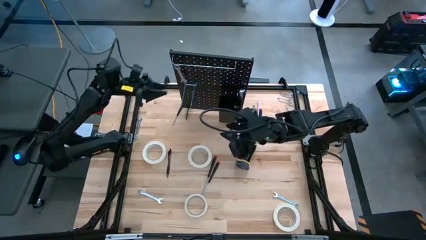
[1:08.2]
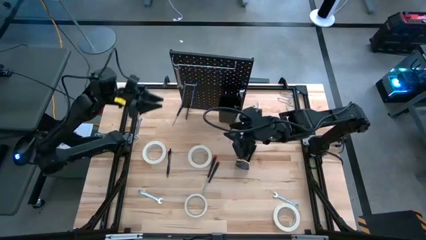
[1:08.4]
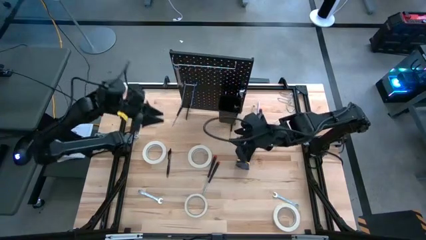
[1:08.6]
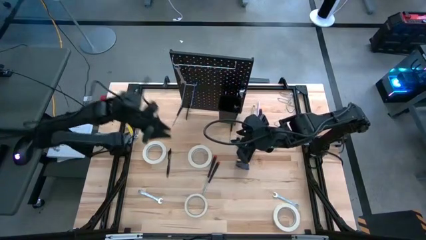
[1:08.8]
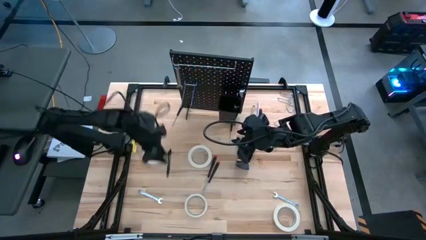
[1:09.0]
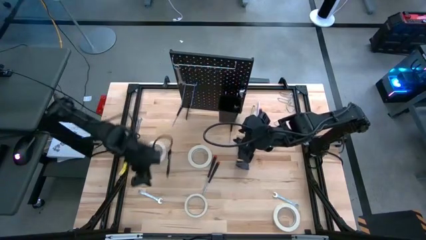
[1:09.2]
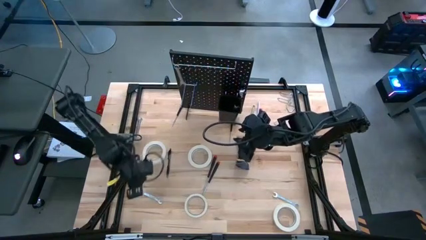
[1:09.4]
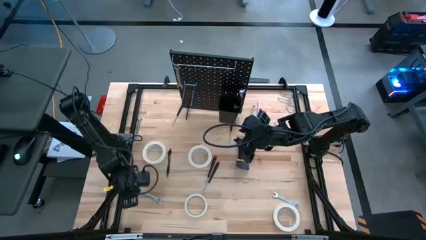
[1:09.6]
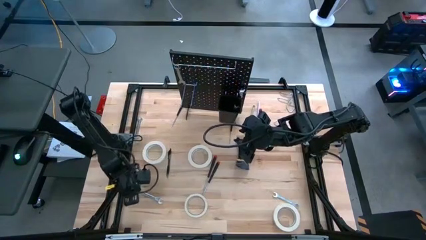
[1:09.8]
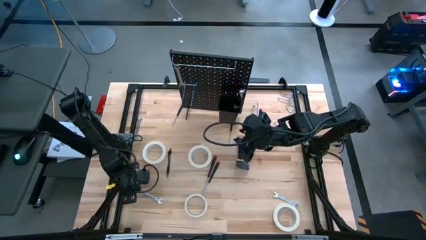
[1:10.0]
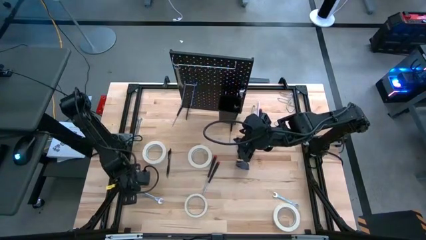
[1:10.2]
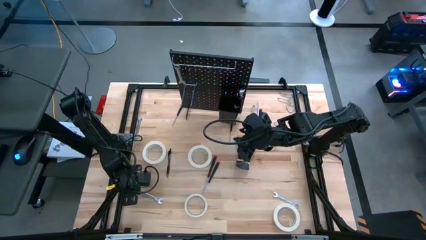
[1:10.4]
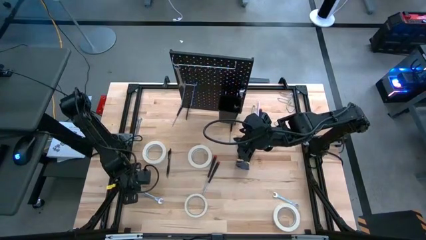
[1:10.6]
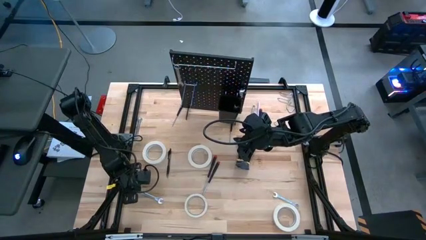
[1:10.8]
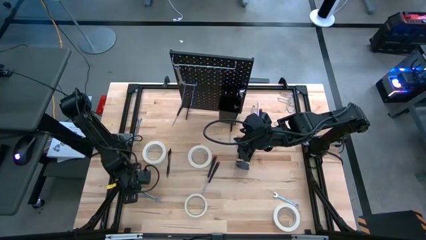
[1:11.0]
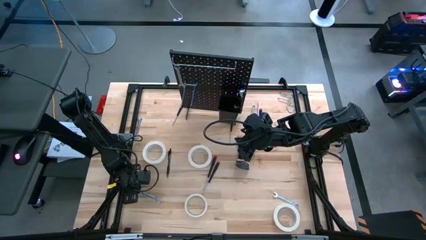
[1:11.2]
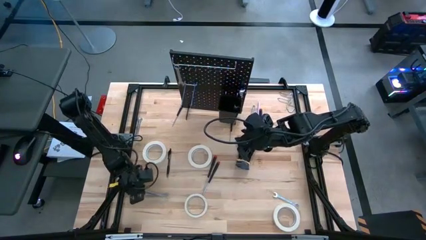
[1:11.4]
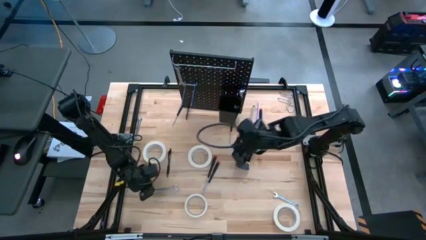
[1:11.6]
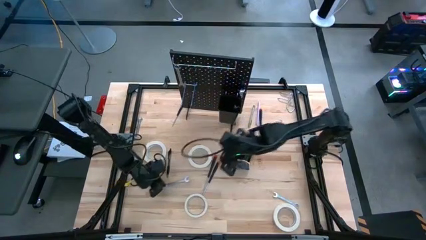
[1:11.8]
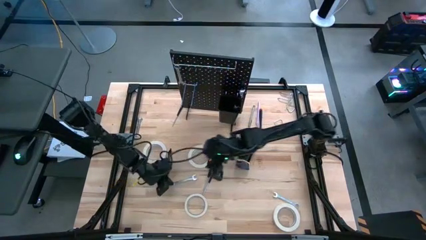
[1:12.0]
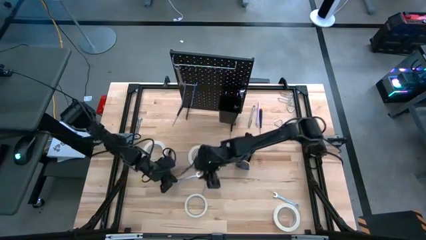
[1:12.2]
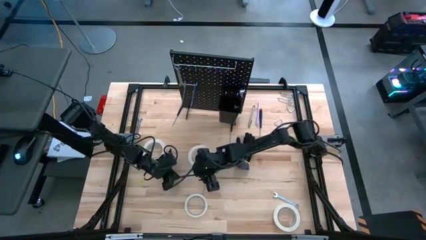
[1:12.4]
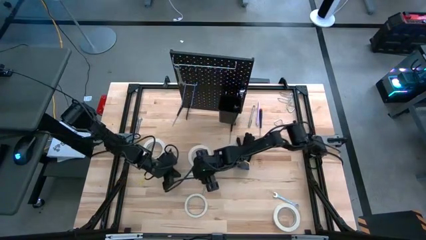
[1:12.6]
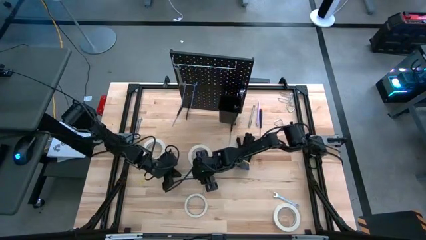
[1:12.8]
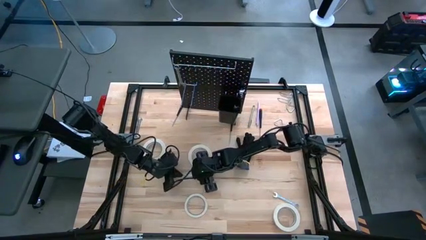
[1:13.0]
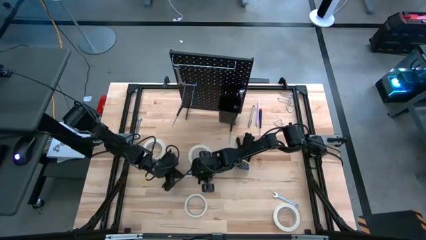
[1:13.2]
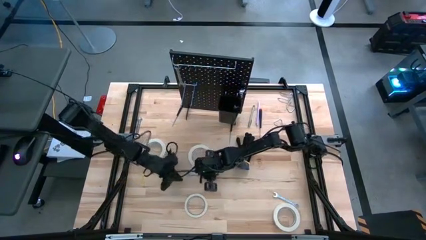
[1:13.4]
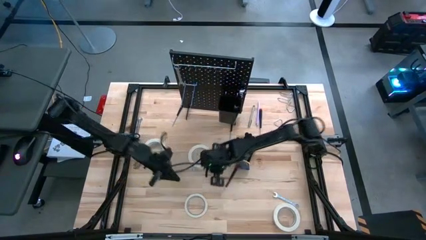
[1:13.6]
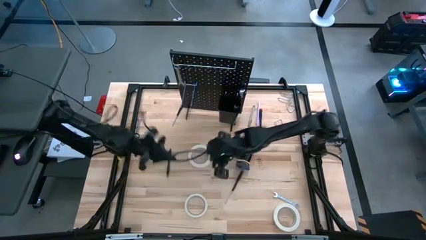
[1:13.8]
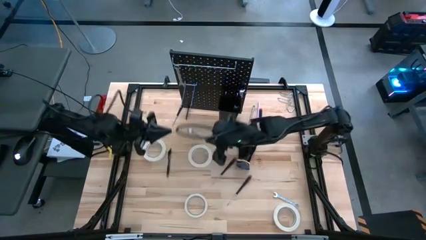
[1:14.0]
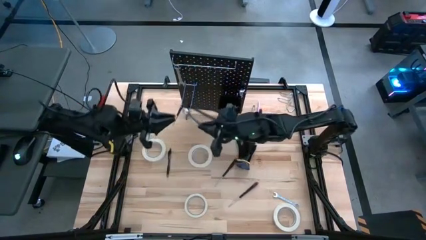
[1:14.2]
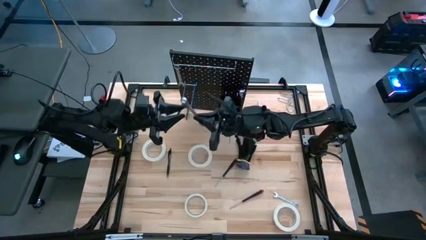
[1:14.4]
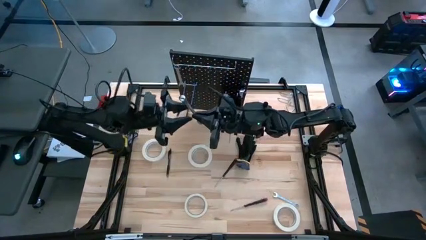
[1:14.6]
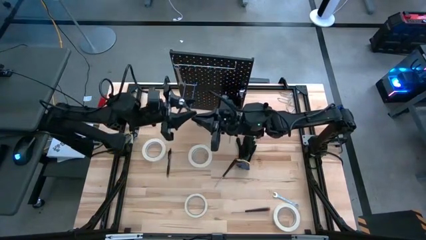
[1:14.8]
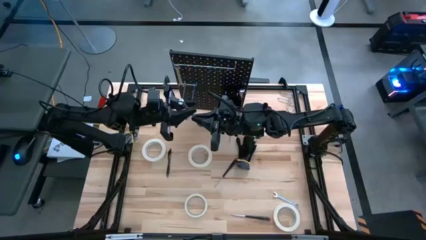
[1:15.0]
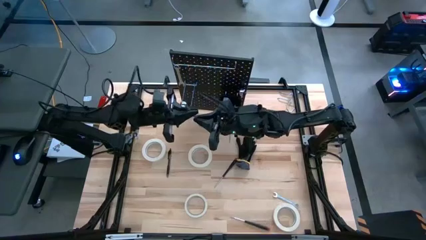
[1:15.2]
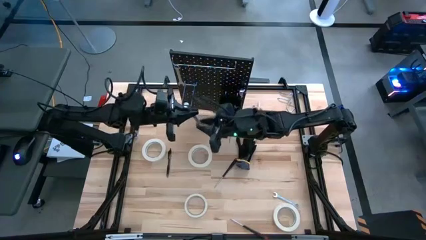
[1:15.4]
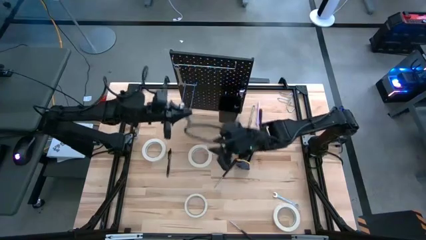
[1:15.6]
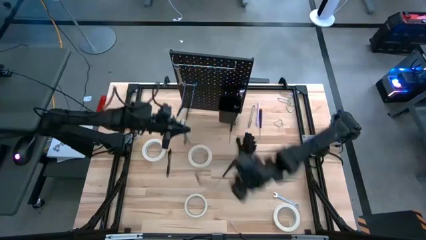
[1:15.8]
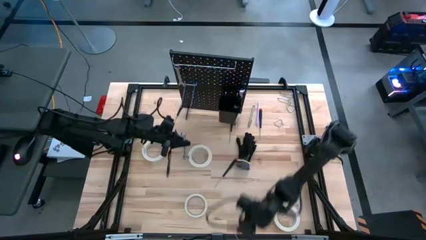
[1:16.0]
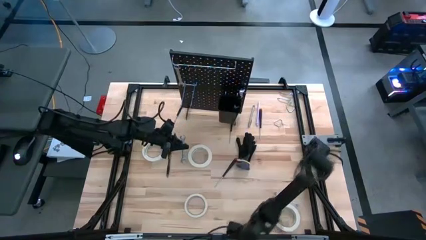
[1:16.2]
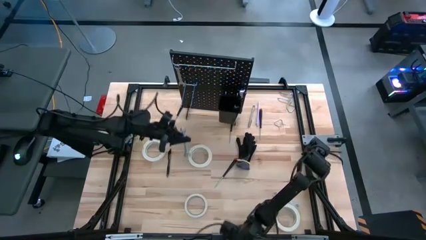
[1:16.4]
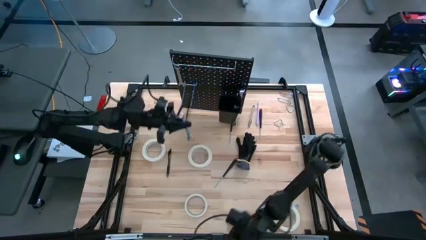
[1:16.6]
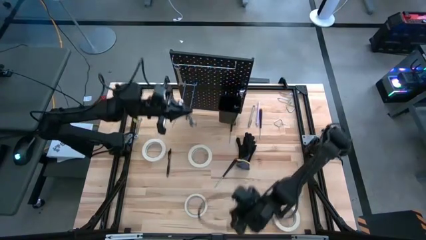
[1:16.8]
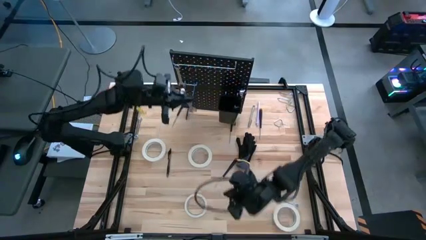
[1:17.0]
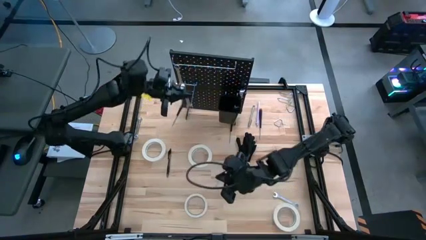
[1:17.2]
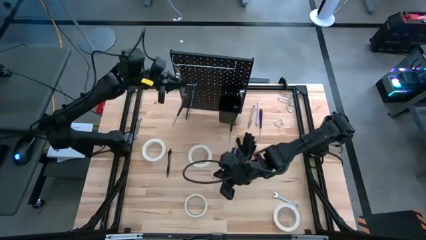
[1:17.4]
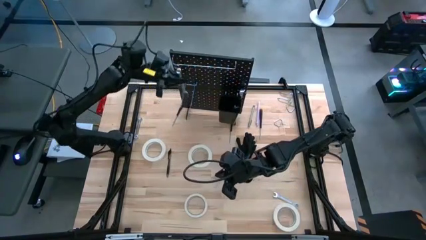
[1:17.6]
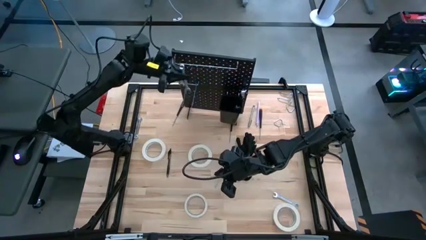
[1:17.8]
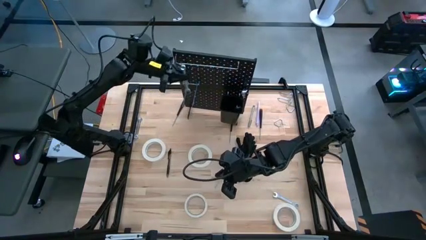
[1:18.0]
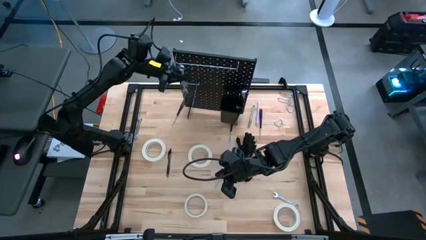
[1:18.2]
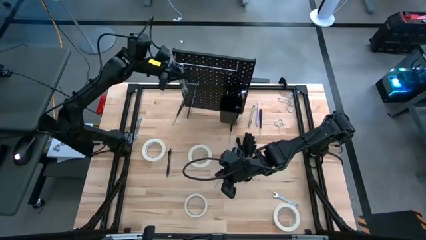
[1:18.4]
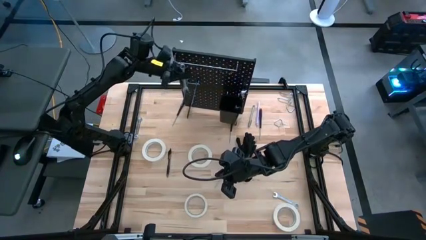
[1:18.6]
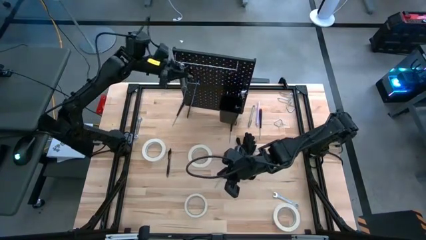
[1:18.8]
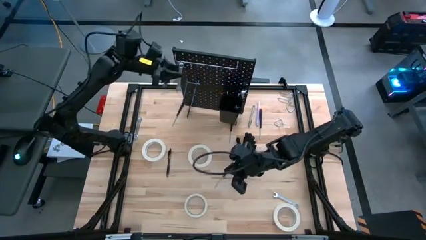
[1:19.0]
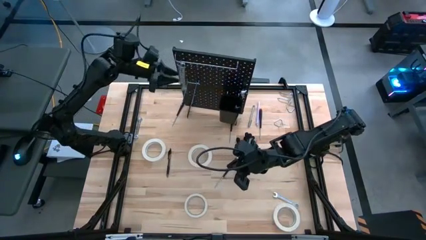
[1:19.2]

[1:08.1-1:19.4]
Task: Hang tools onto peg board
Hang the 12 mm tool onto the pegboard aligned with the others
